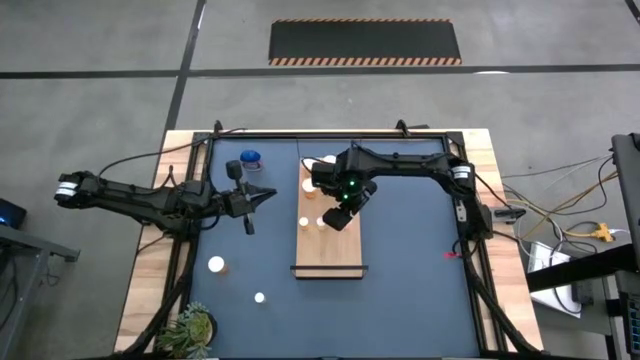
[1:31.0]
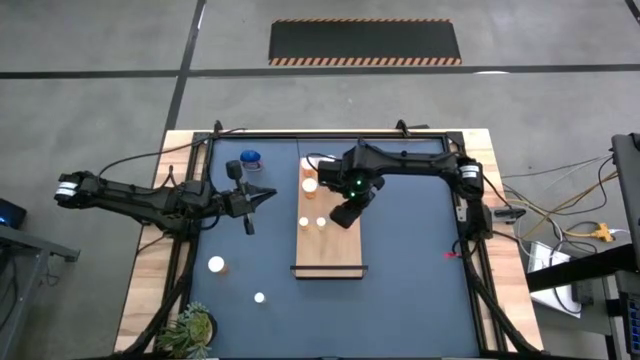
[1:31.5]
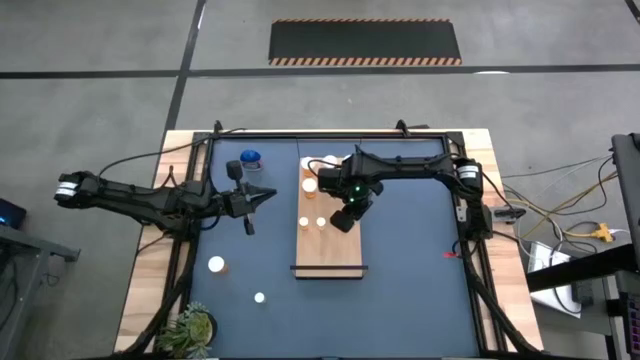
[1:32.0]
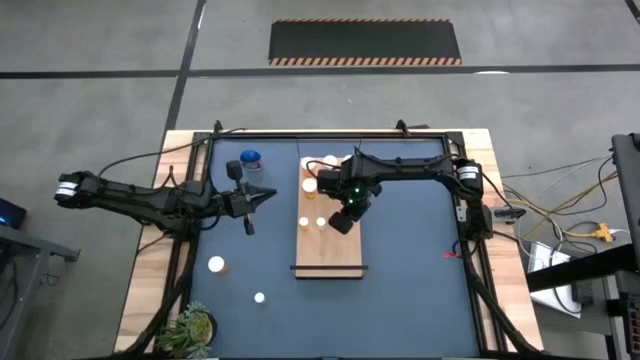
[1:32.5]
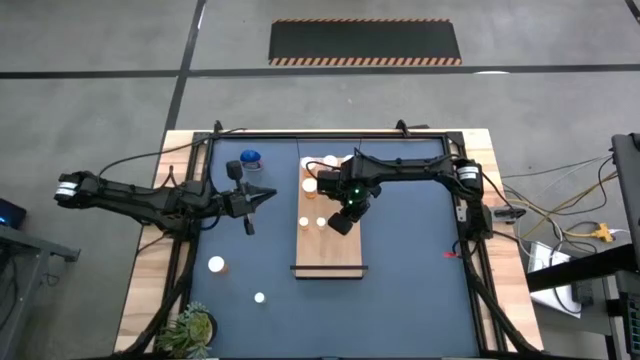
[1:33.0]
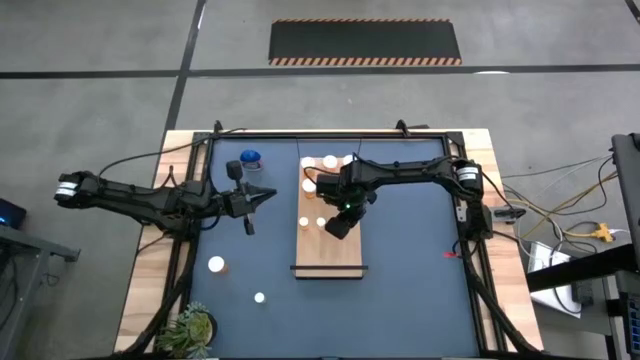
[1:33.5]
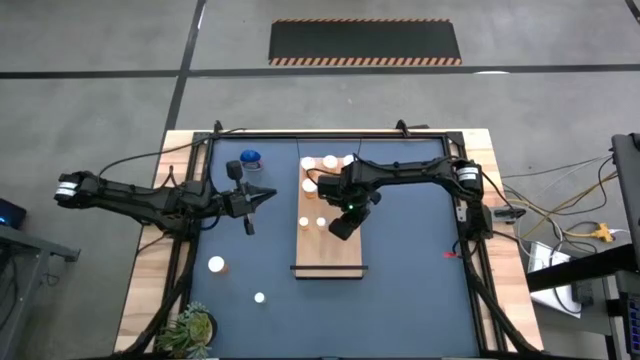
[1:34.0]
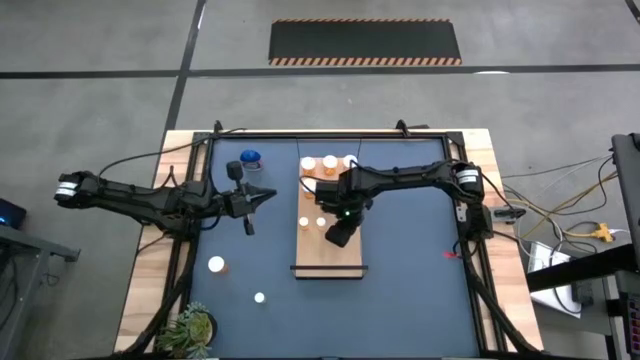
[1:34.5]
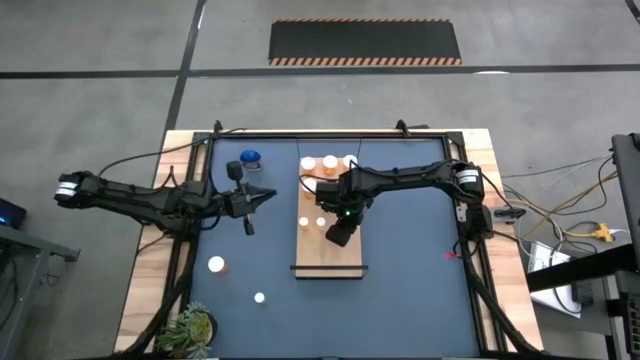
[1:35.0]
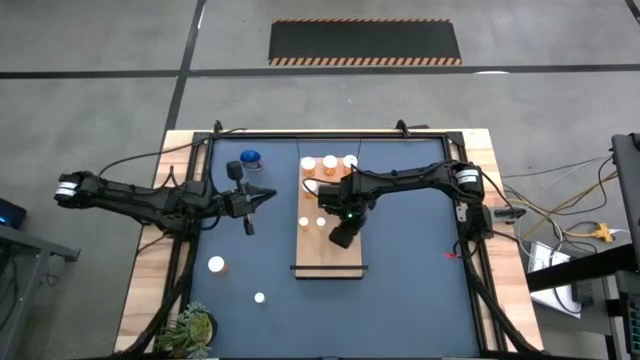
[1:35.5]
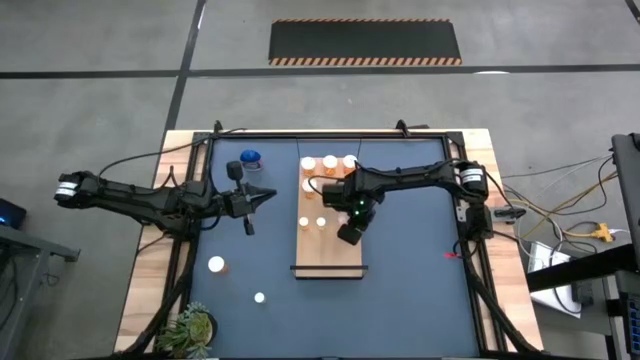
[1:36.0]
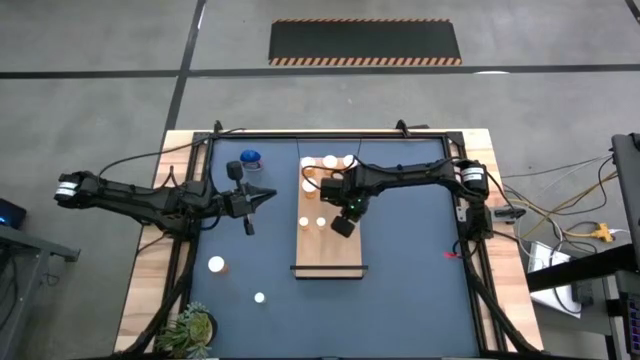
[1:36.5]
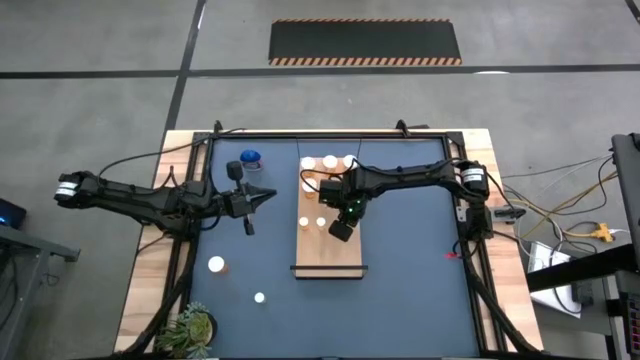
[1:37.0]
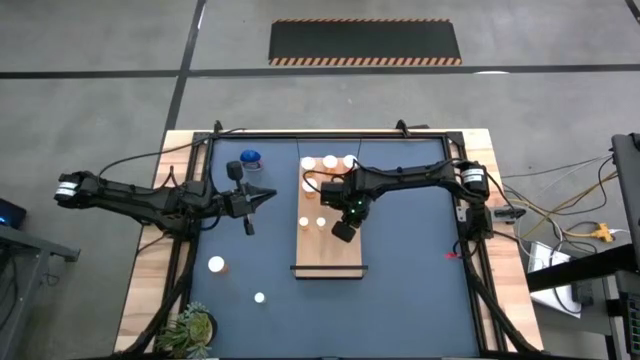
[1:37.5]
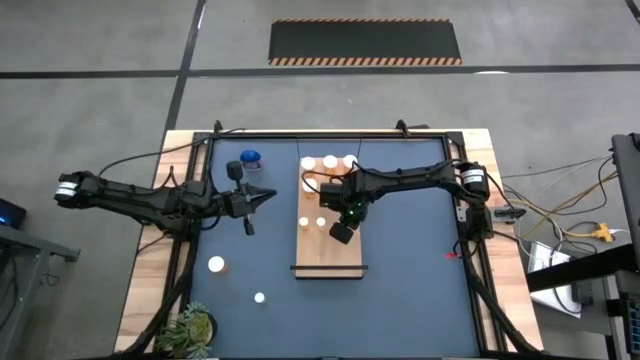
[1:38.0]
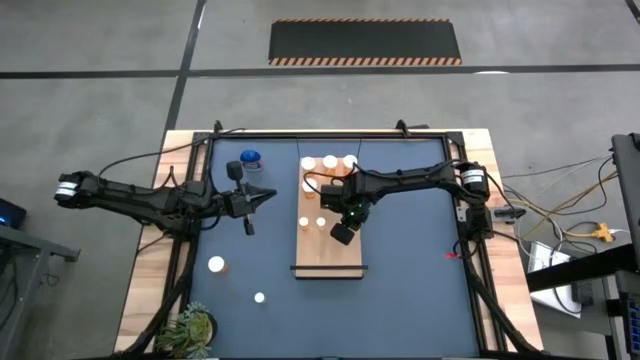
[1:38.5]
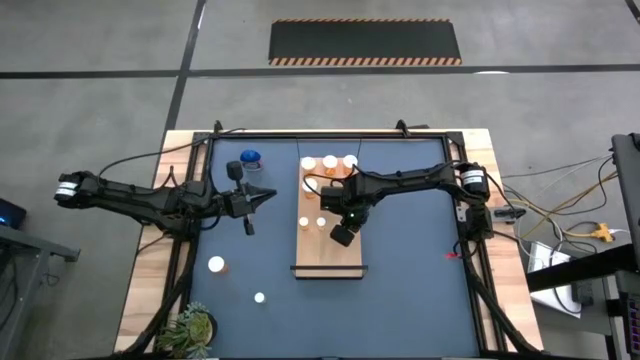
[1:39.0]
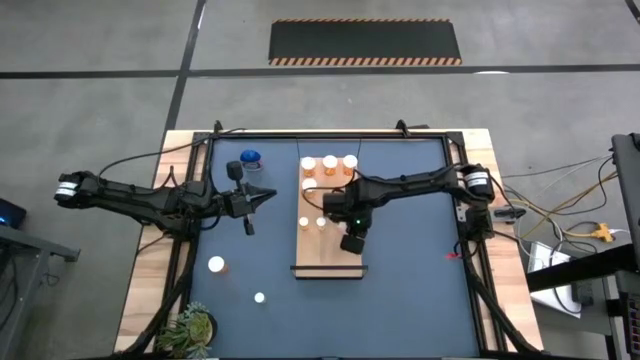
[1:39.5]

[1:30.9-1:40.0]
Task: Pick and place medicine bottles onto shelf by color
Put the small pink pill bottle on the shelf

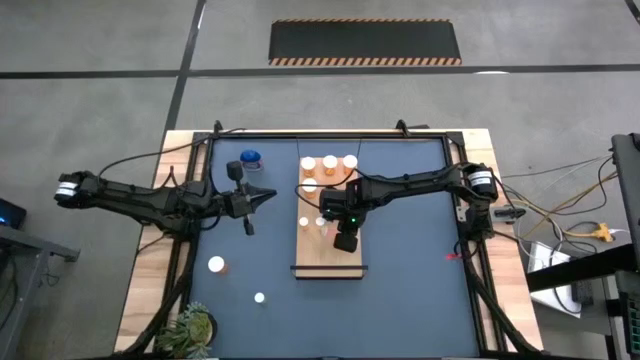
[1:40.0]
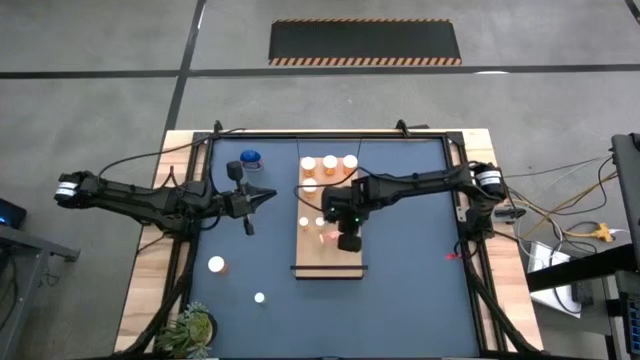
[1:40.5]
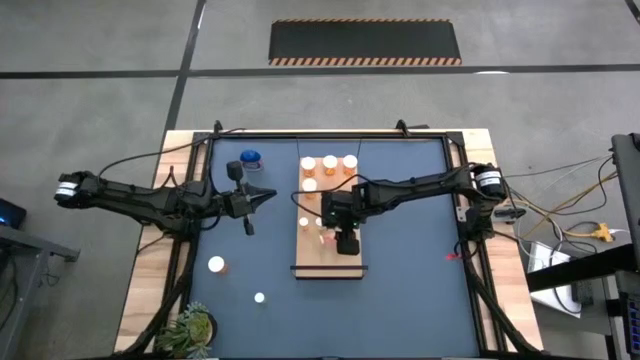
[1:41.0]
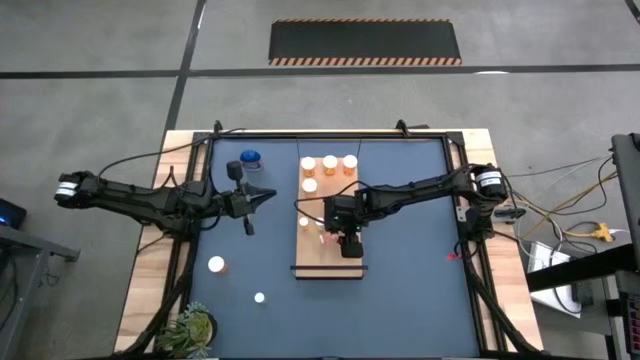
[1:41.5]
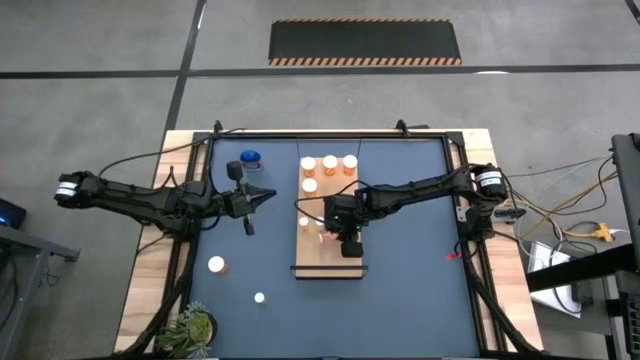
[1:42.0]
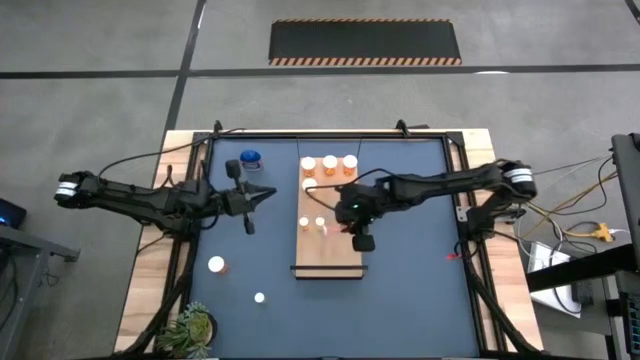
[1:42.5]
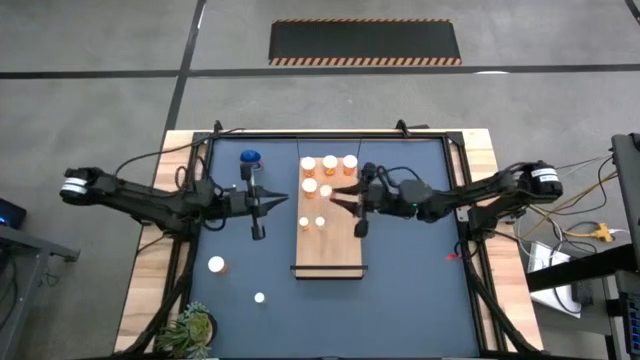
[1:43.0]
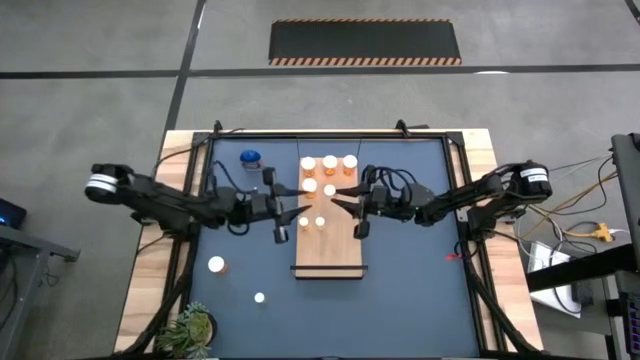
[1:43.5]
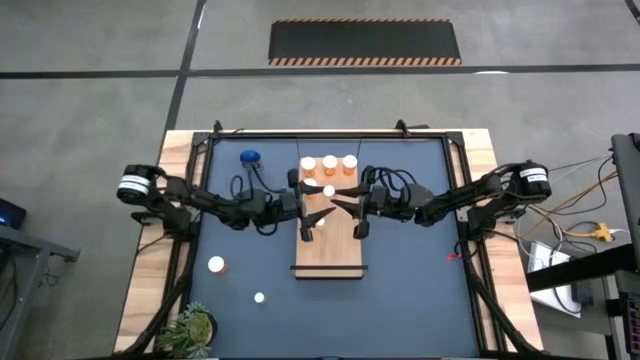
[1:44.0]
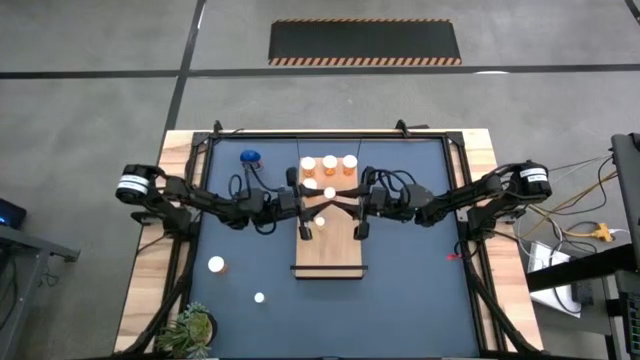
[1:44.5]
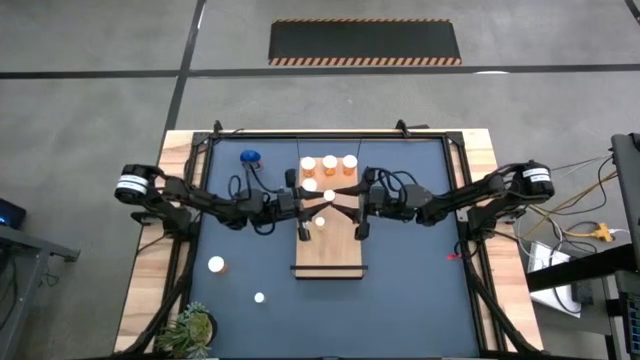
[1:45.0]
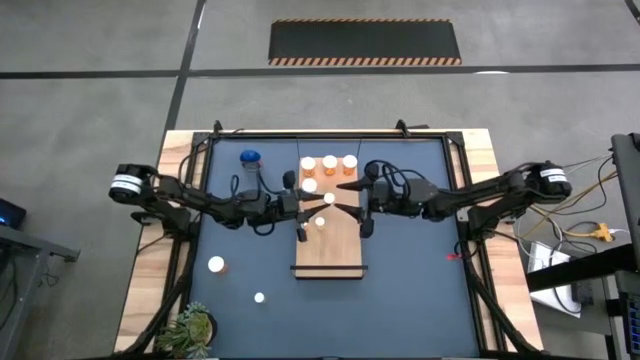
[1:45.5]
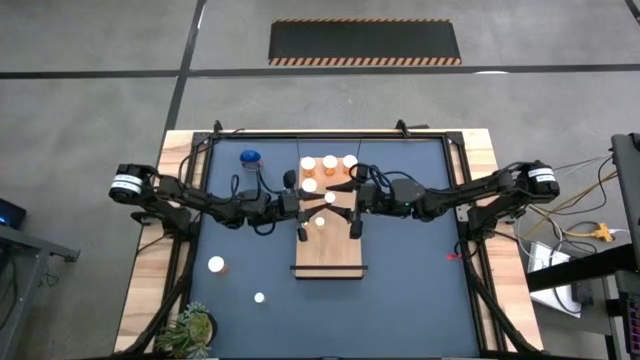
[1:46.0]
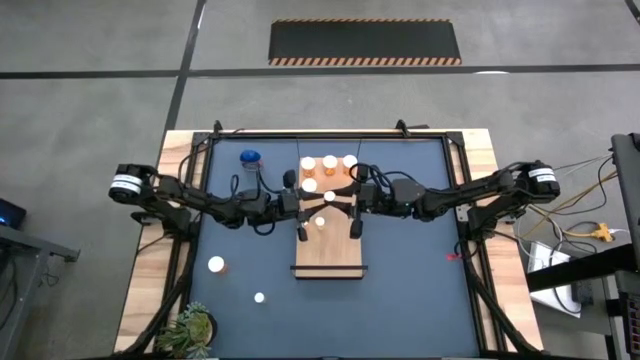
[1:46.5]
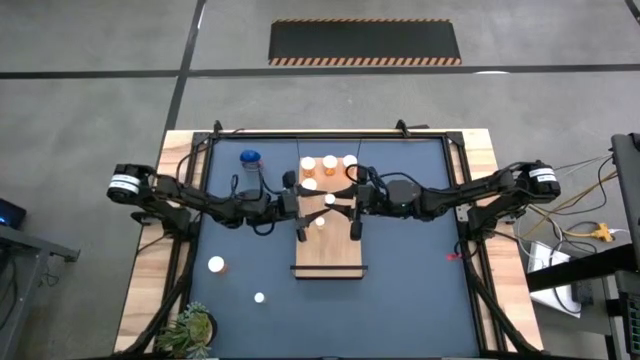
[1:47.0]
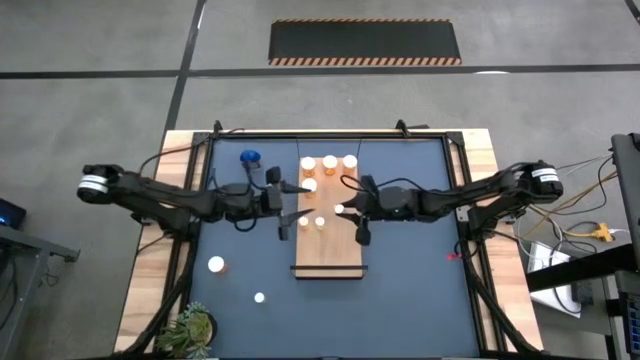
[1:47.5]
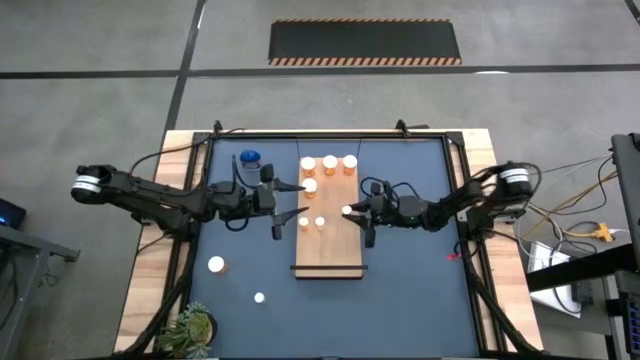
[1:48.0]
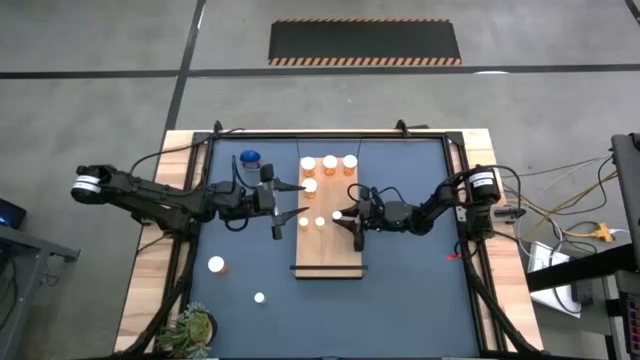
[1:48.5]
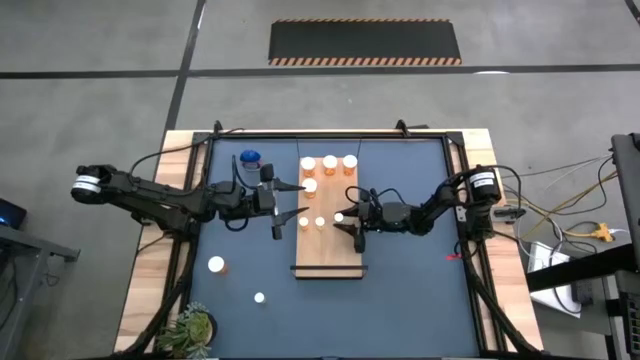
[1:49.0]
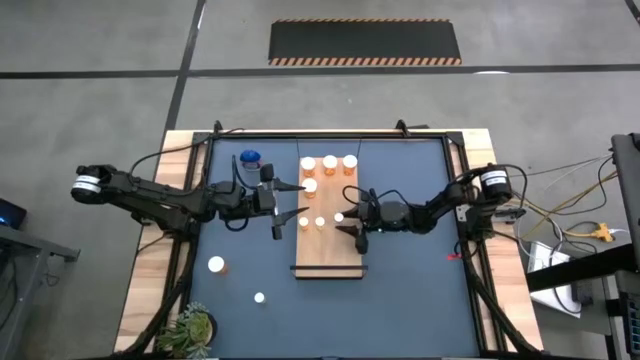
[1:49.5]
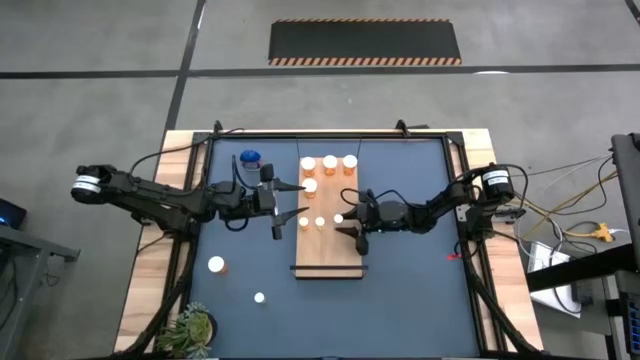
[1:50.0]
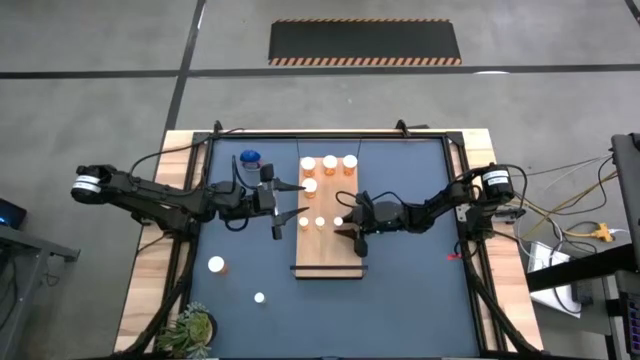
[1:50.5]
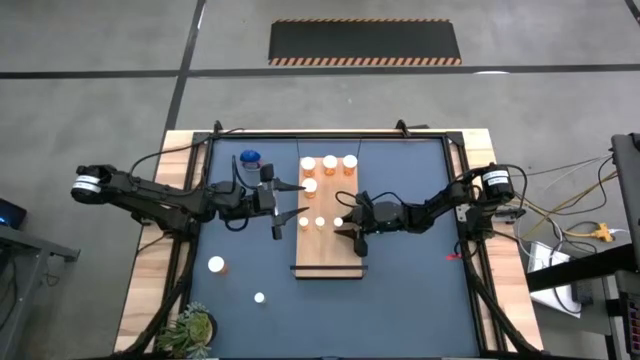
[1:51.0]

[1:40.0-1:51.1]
Put the small pink pill bottle on the shelf

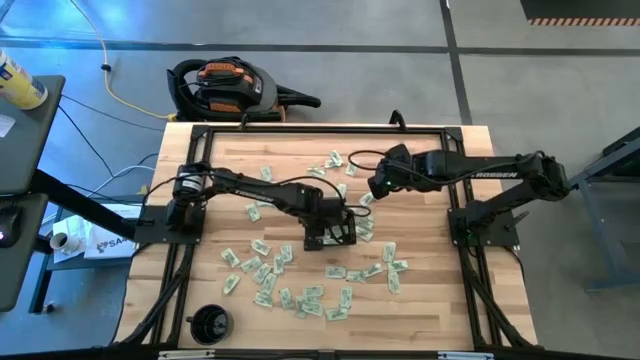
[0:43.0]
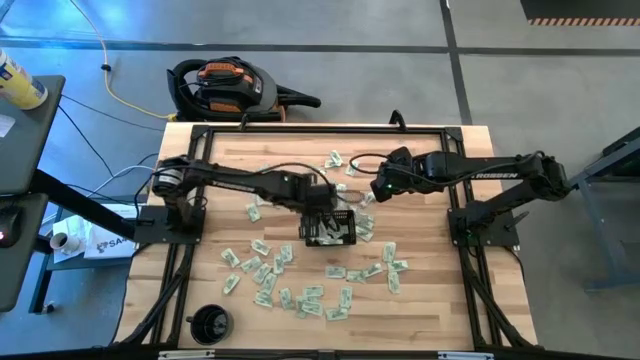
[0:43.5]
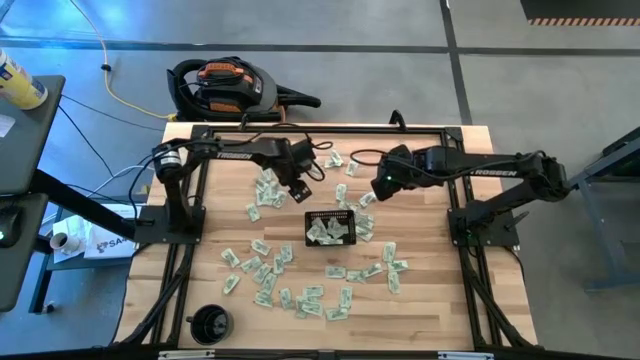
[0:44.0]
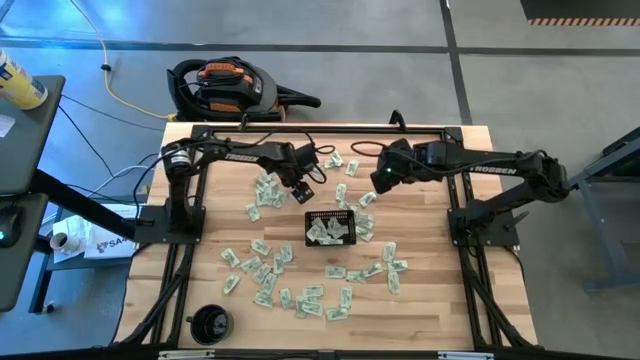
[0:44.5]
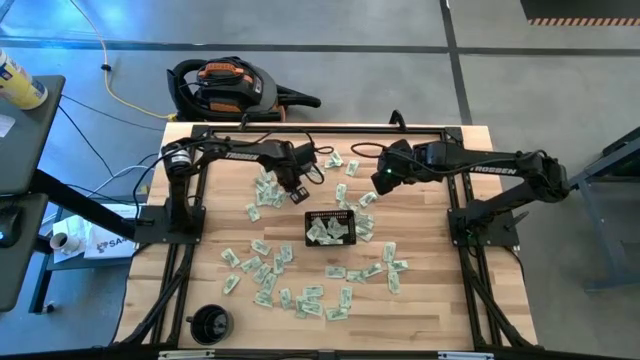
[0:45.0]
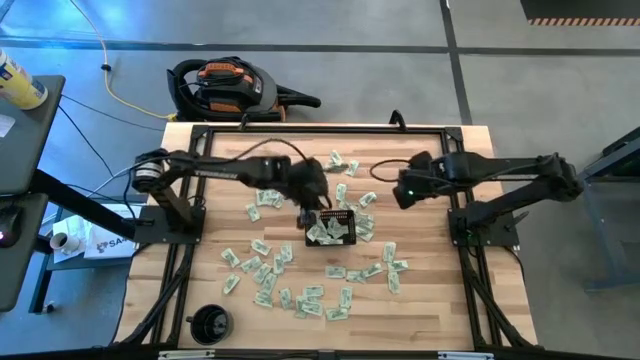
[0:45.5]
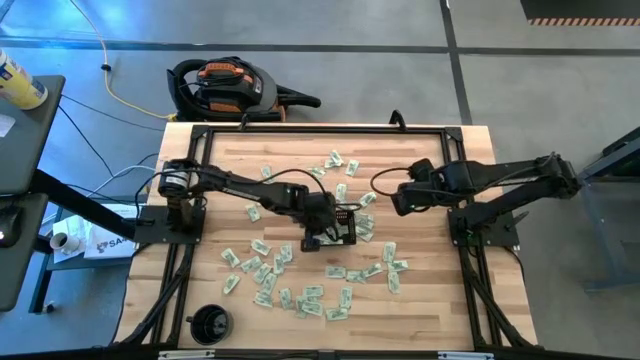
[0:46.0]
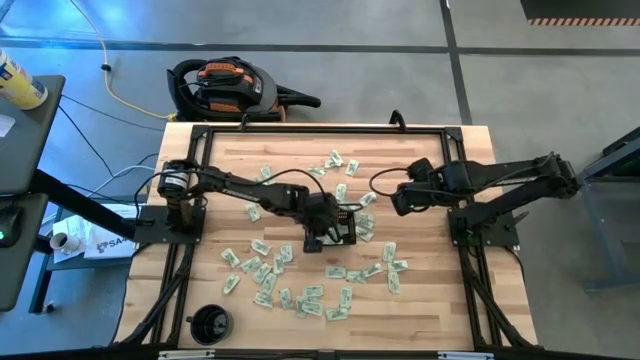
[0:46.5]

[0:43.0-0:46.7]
Task: Pick and place Stevia / Truvia into bins
Put the green stevia packet into the black basket
